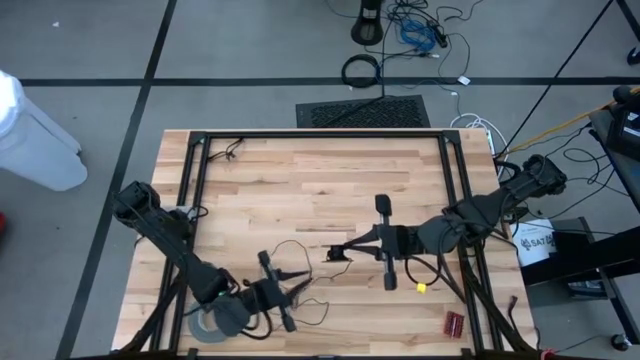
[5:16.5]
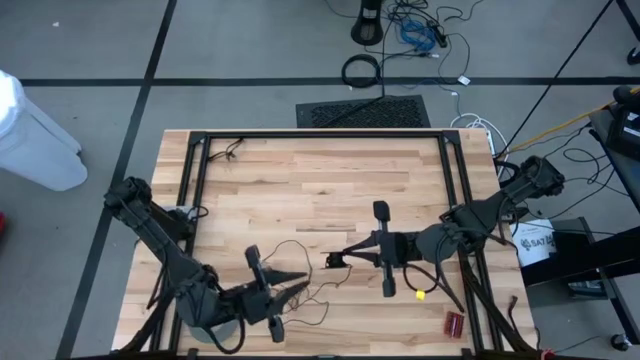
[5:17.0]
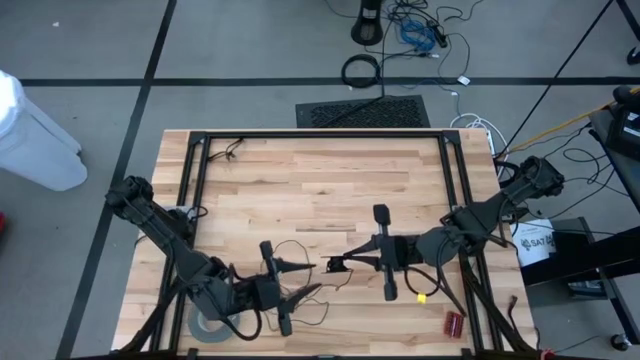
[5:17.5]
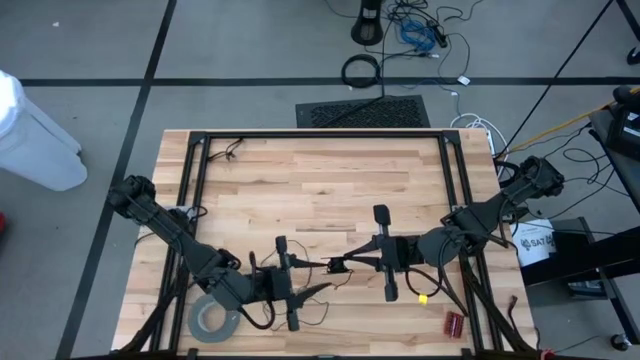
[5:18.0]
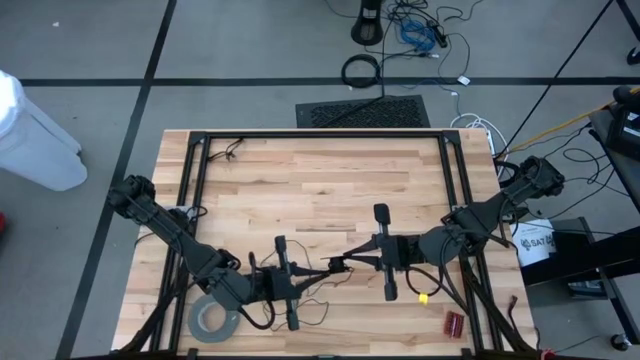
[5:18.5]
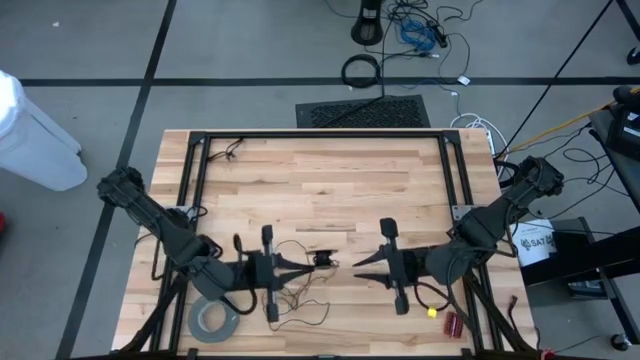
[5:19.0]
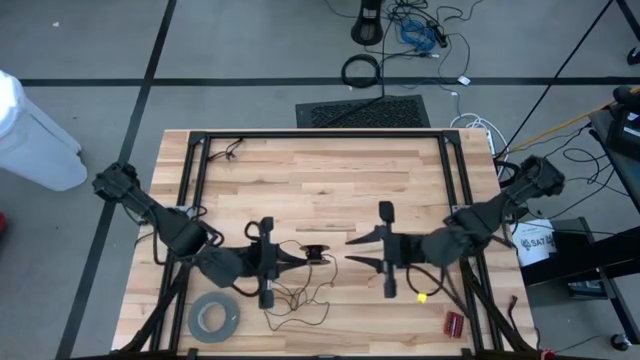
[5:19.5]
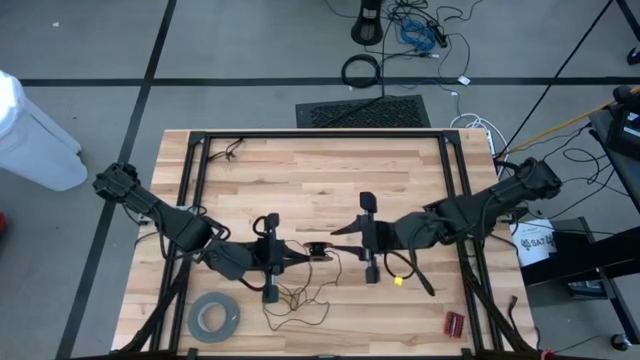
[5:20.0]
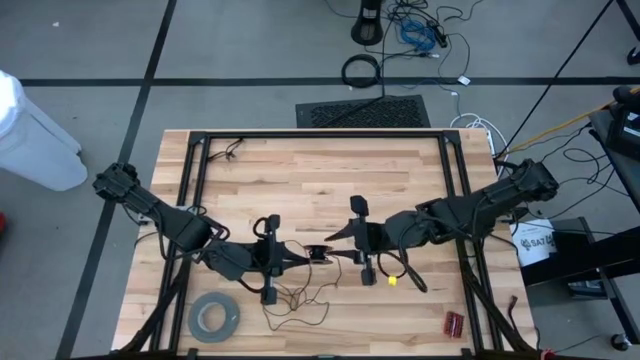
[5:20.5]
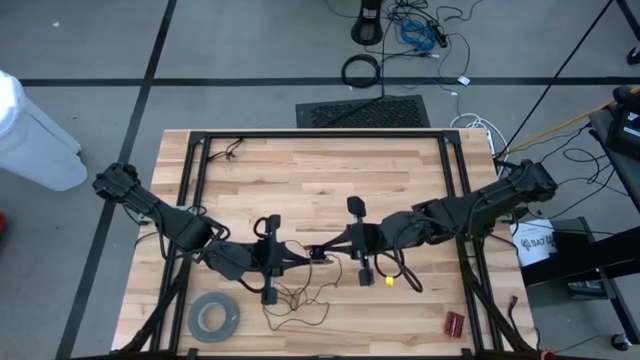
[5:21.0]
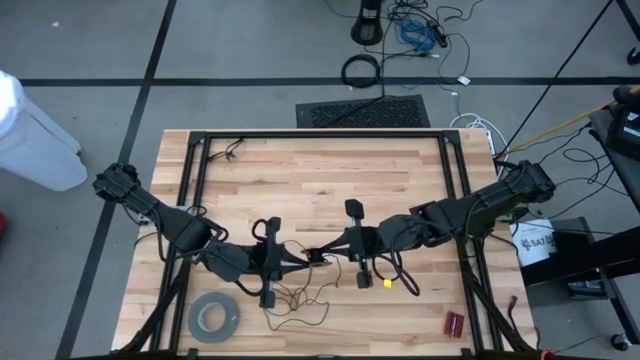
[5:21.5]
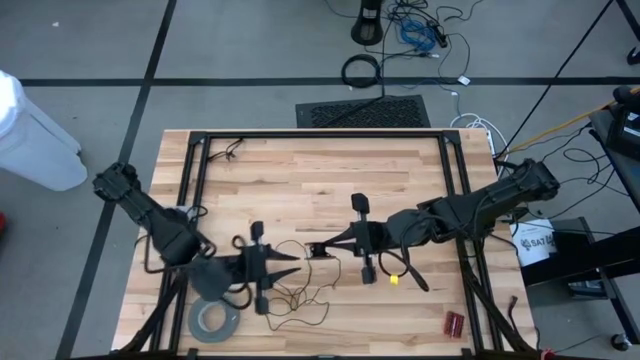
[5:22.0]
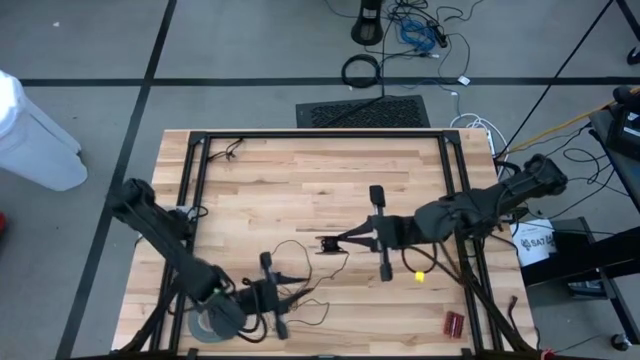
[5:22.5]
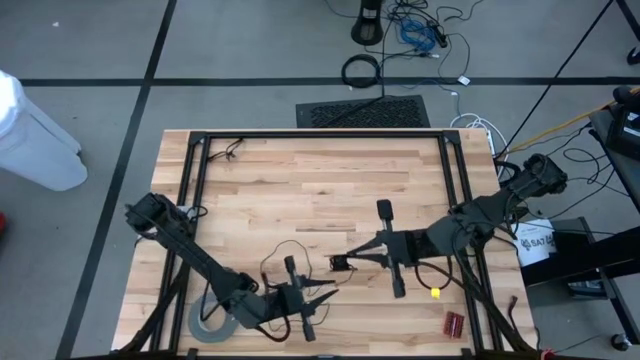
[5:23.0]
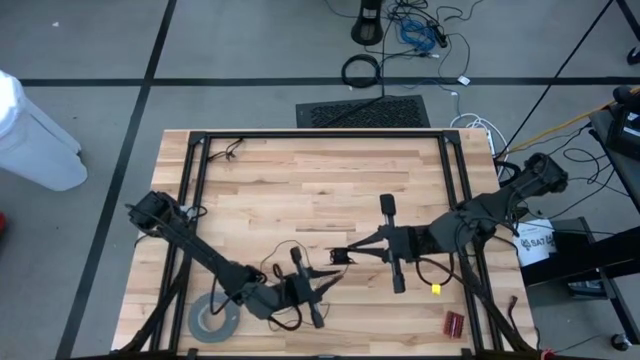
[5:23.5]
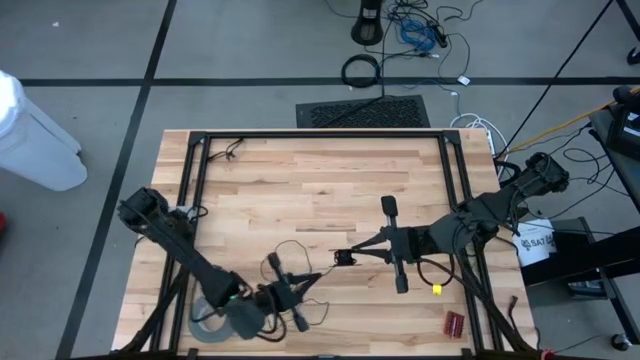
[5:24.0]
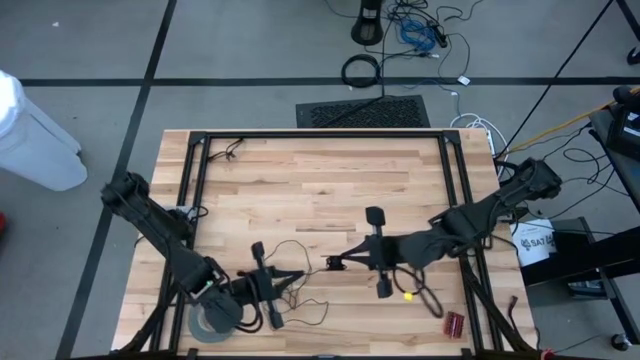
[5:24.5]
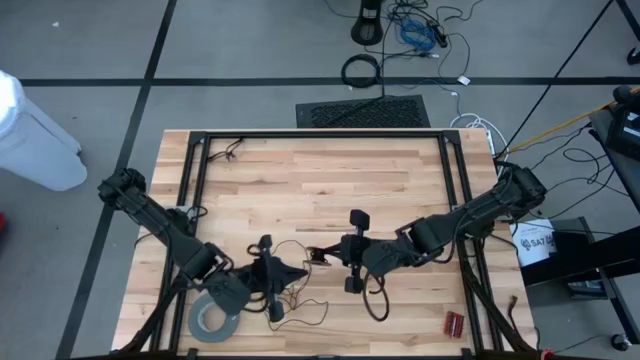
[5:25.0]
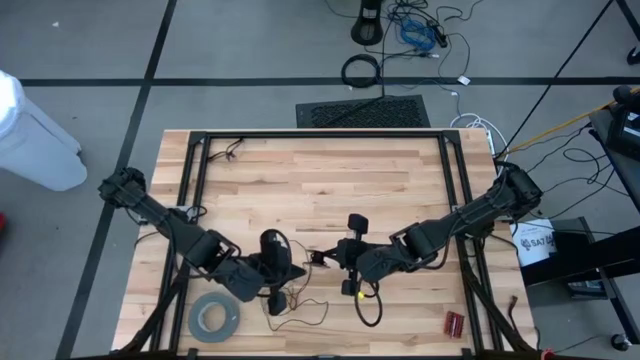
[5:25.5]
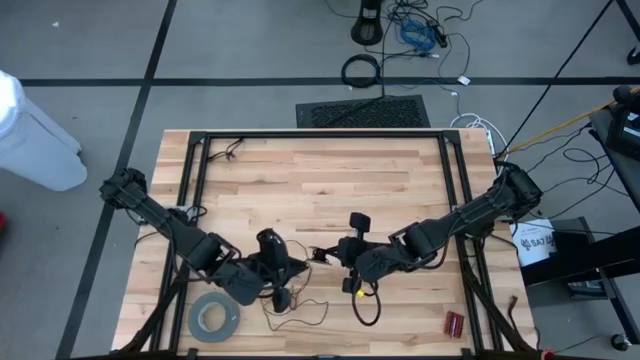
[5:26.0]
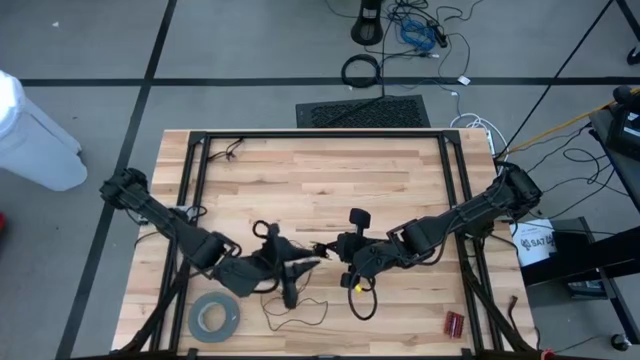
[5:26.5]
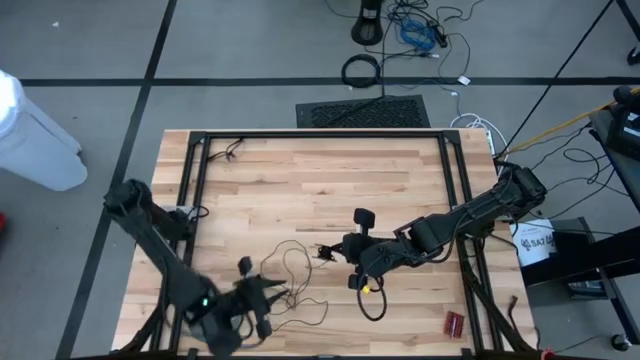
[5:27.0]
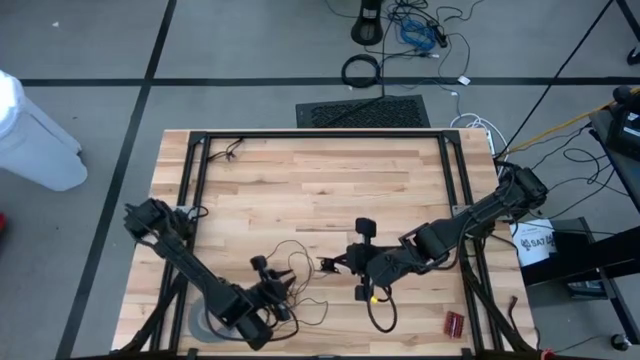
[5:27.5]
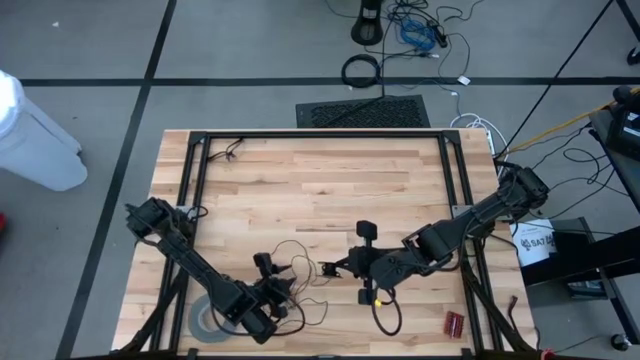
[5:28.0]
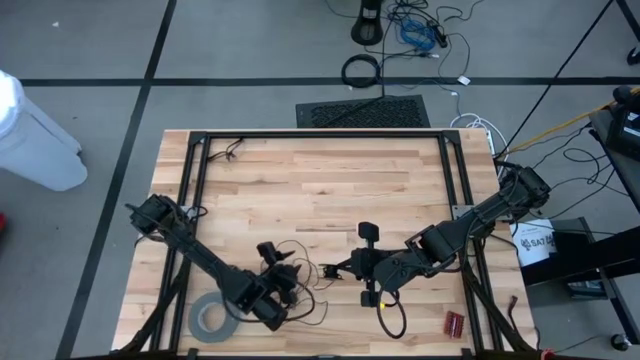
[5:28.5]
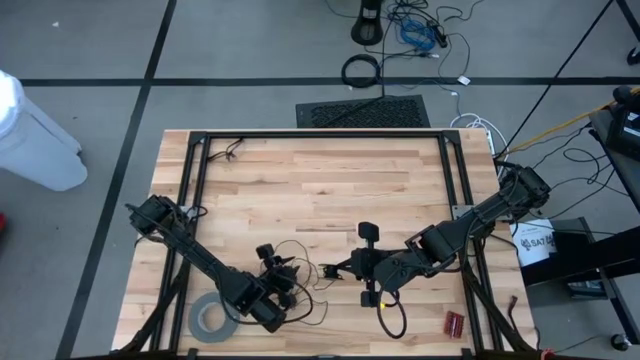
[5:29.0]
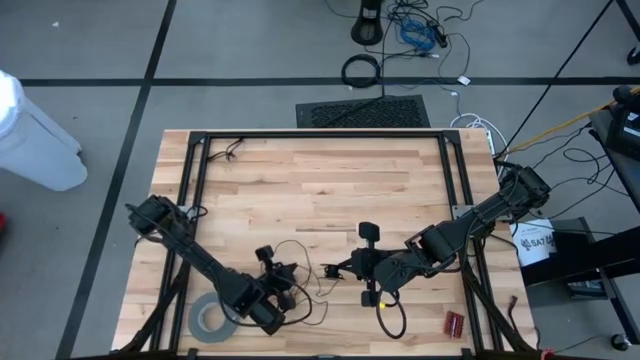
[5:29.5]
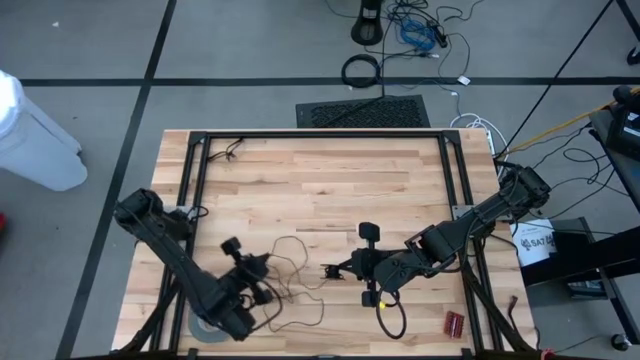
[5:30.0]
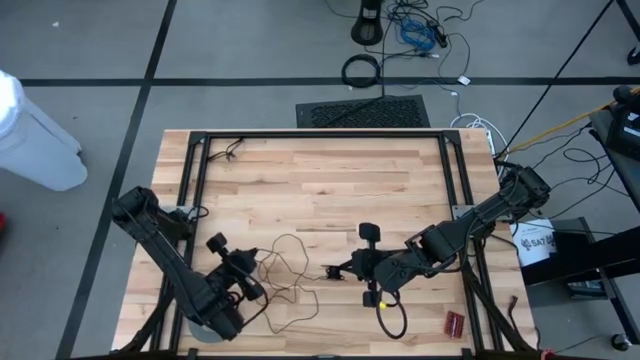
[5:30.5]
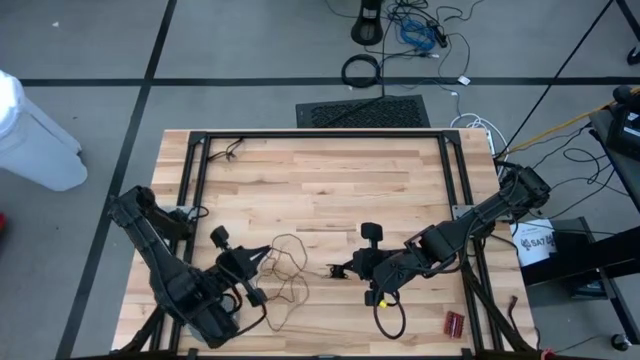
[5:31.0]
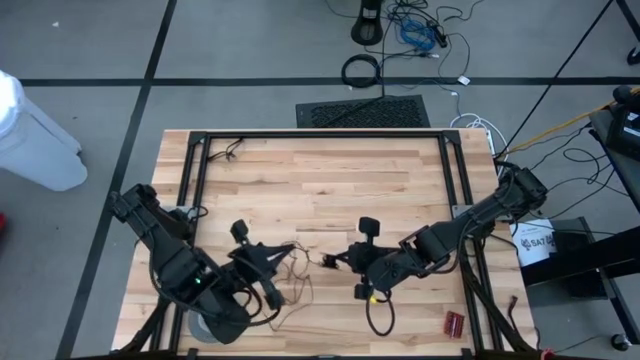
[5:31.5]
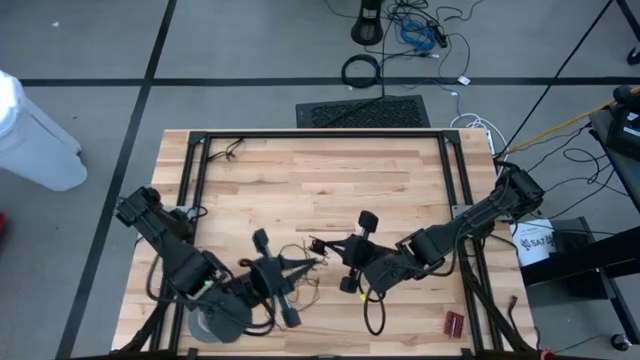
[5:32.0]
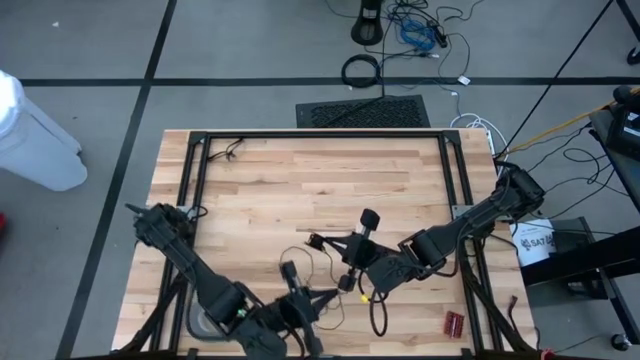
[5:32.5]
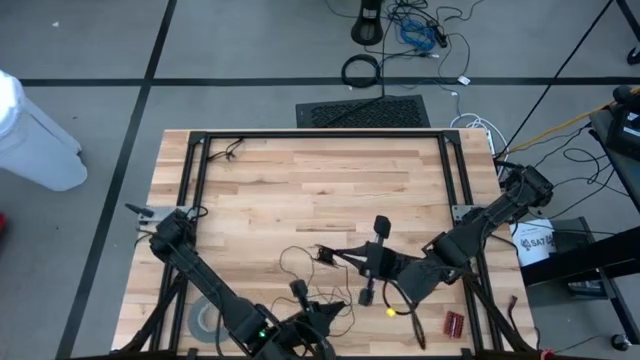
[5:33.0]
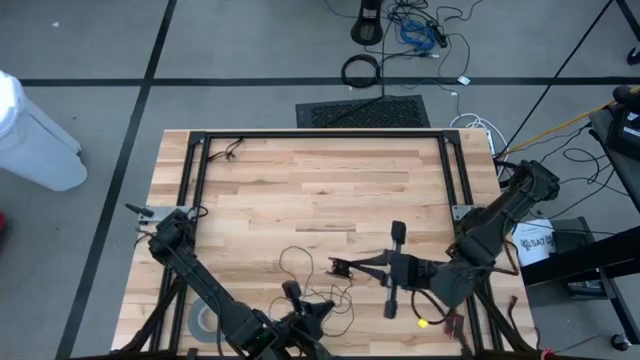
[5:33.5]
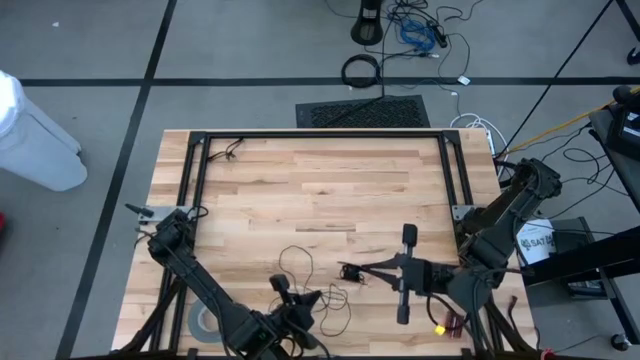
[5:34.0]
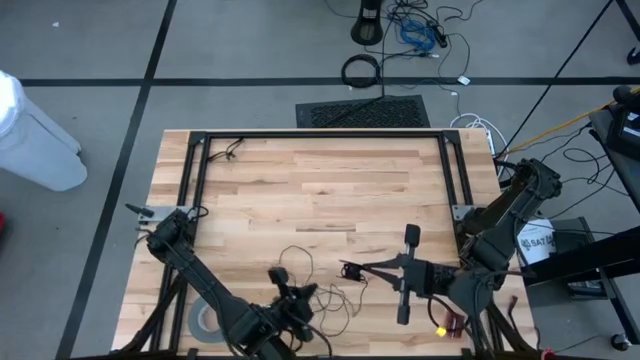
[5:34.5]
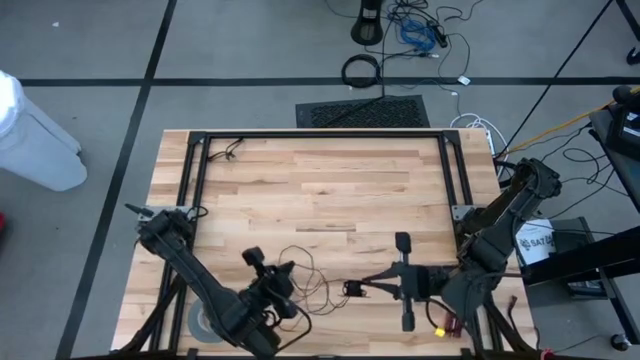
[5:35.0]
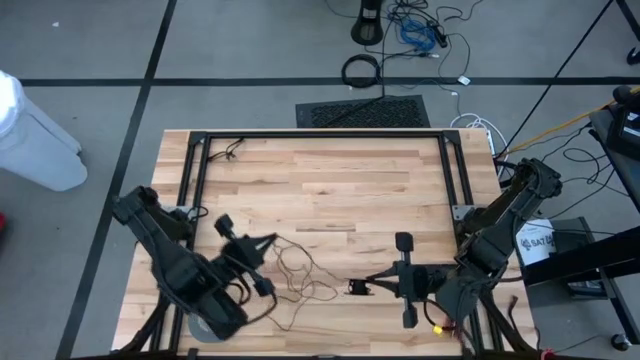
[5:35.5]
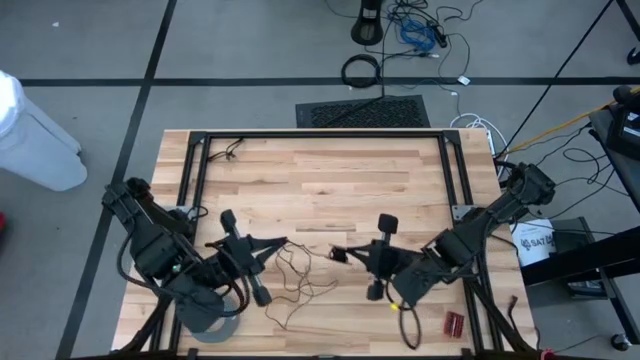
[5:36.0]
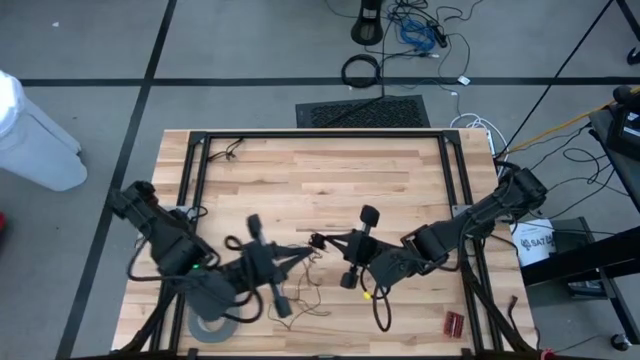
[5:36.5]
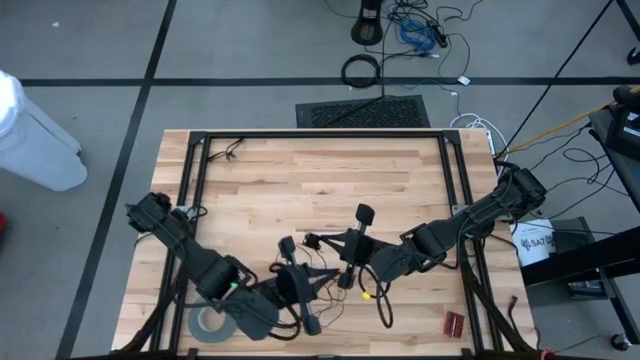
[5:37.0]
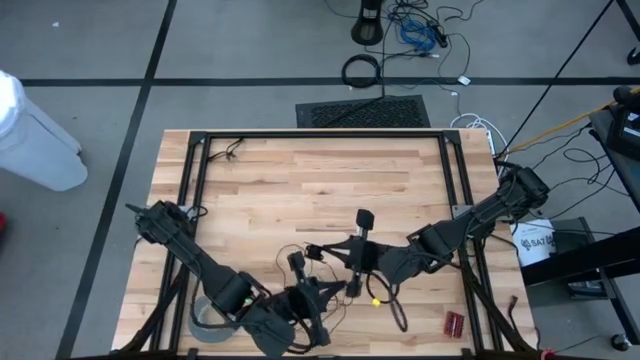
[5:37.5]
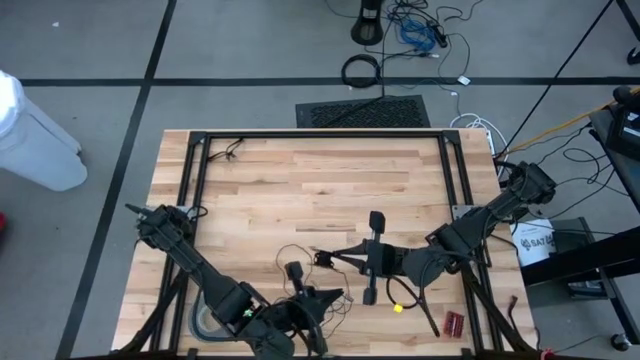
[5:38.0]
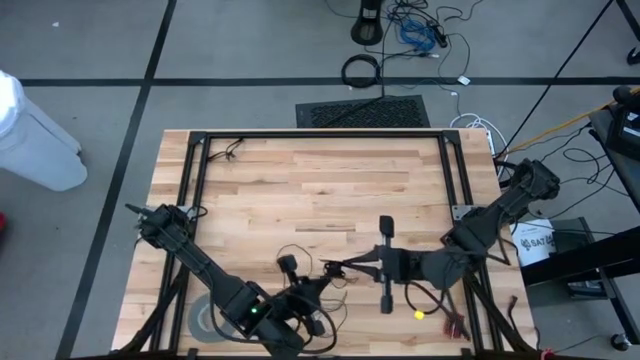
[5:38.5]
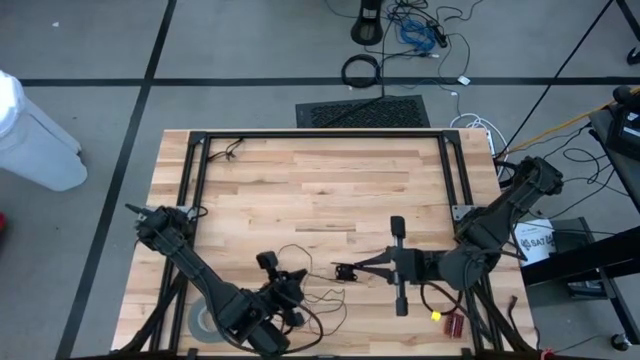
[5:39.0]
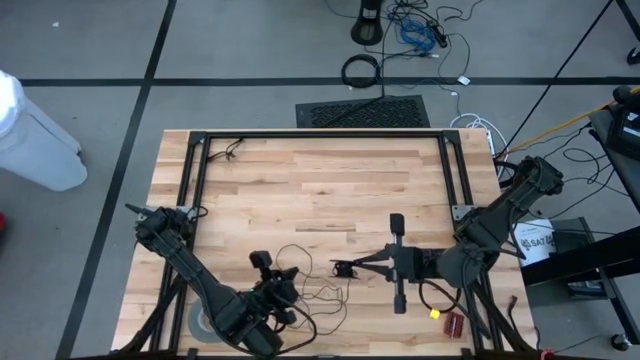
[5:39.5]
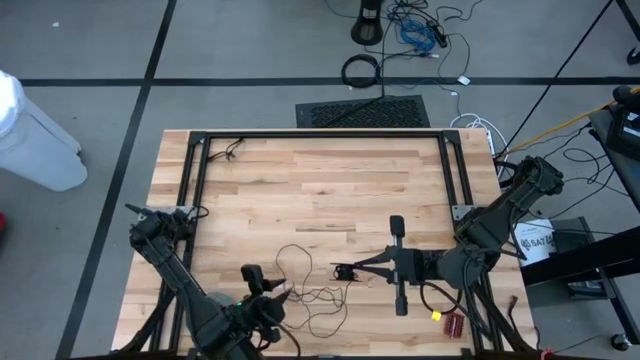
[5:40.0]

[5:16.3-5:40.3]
Task: Coil cords
Coil the black wire onto the spool
